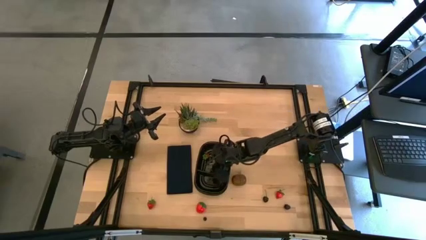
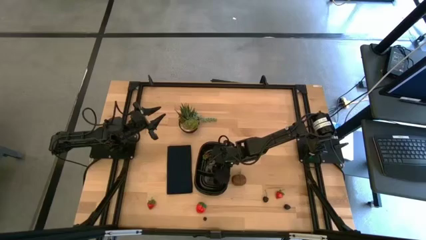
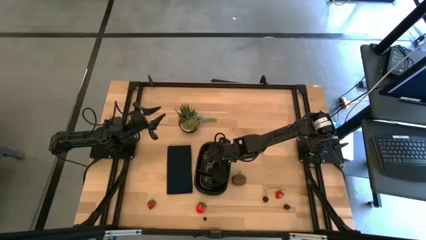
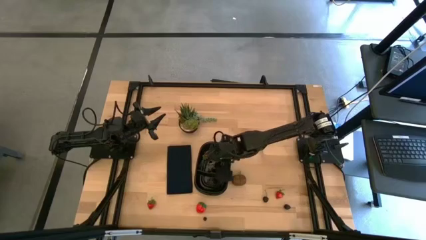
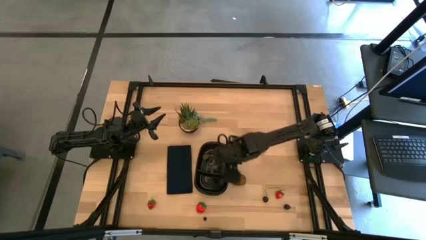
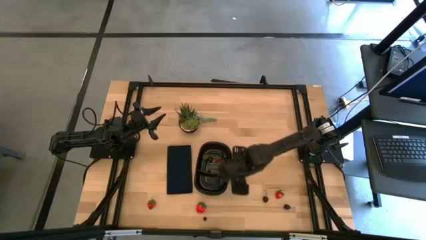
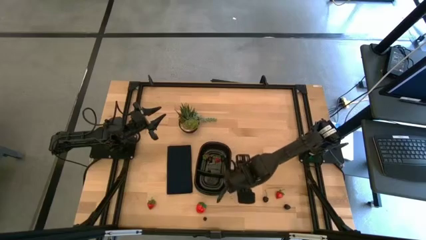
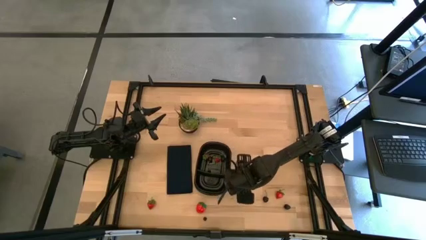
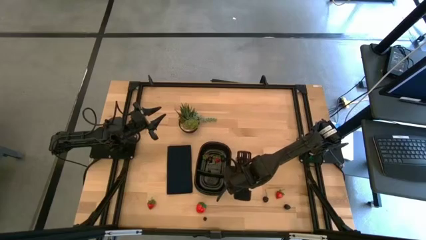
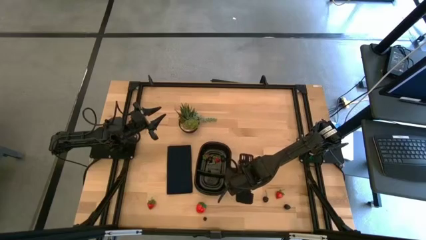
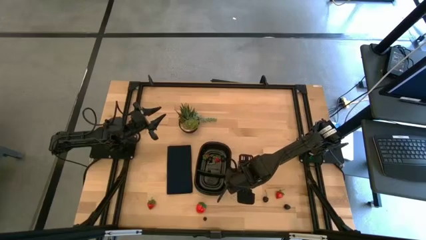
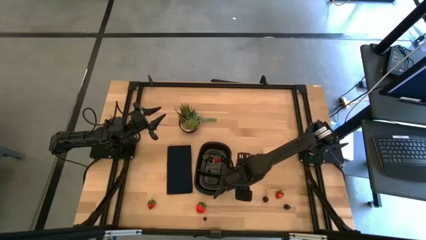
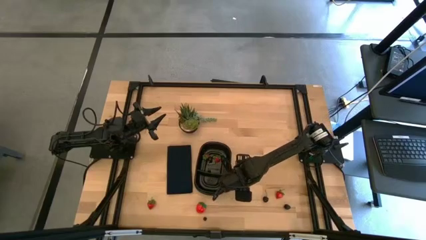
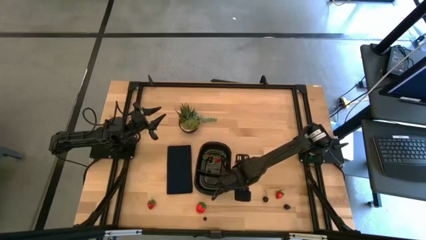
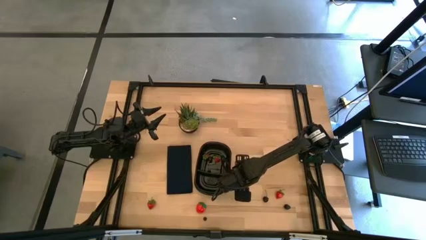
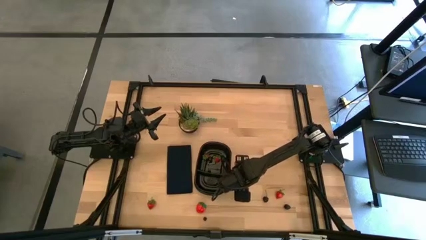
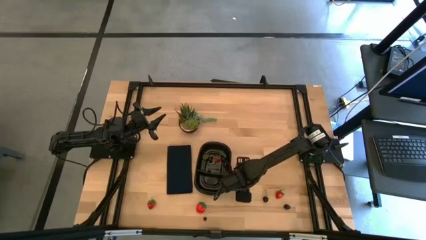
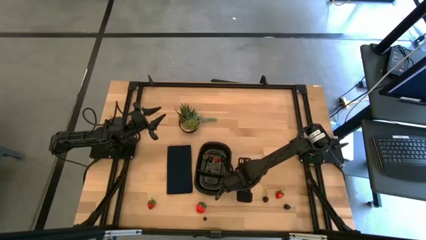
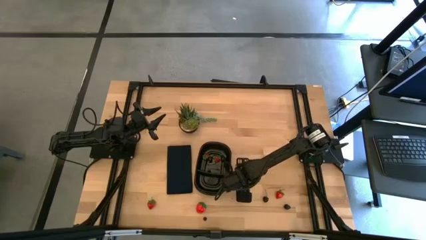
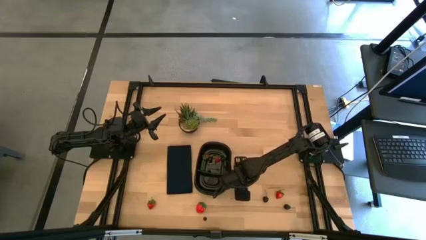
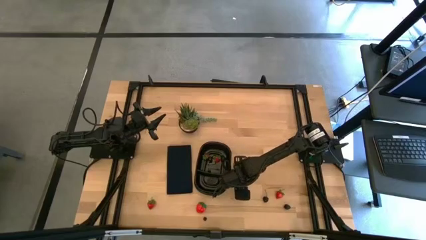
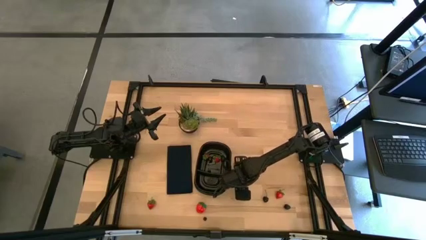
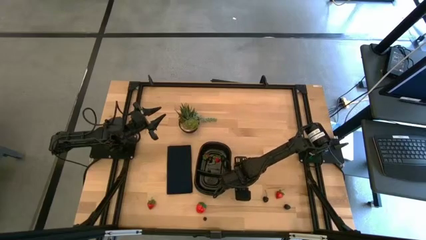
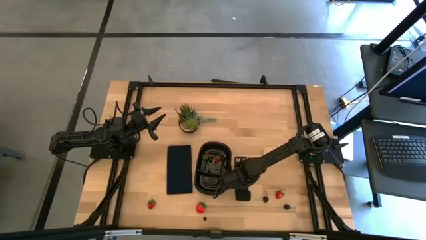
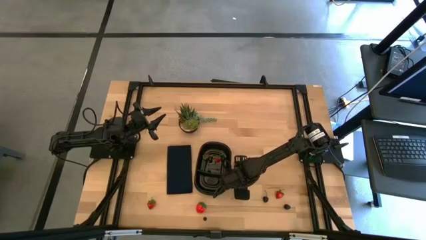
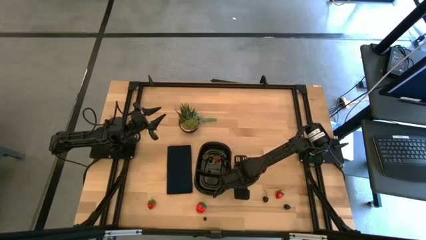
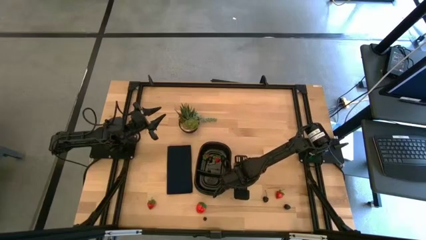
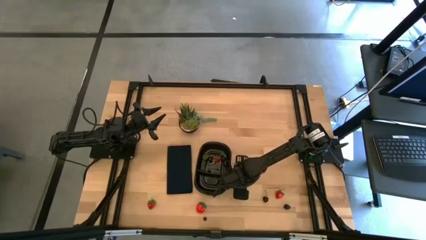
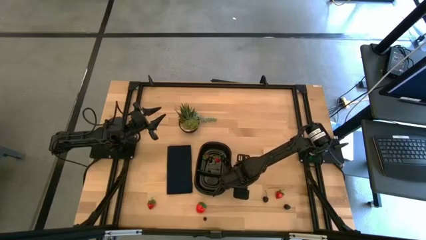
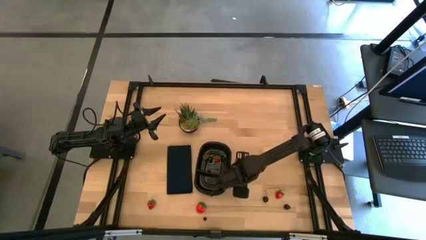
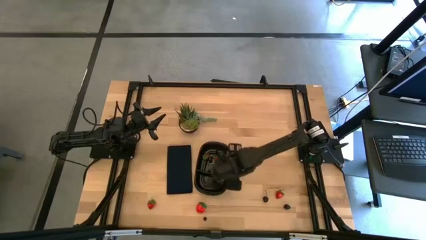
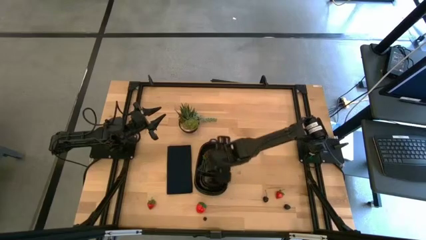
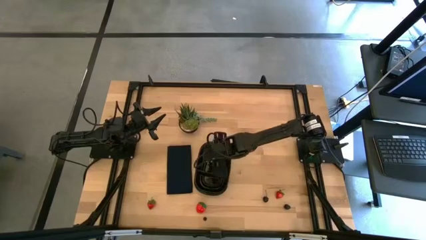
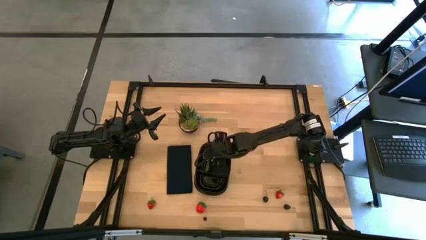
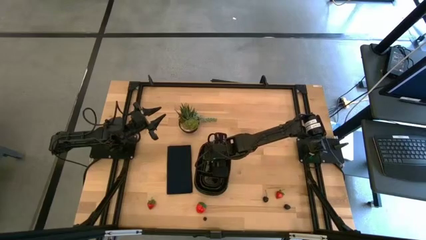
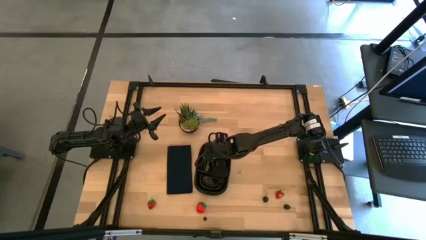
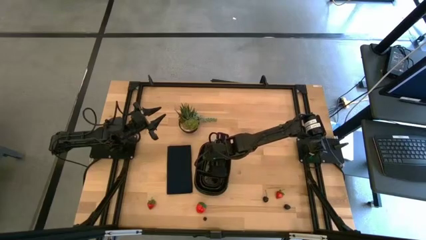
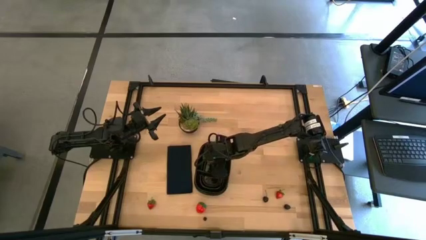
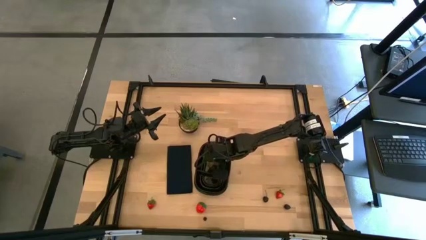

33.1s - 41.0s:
Task: Pick and placing Produce into tupperware
Put the brown kiwi into the black bin

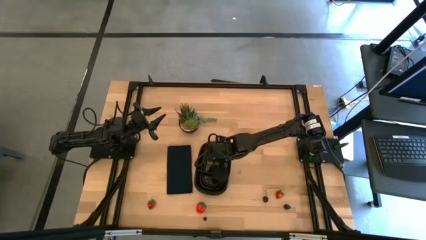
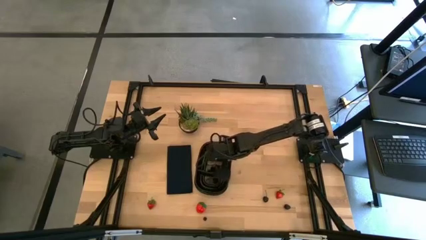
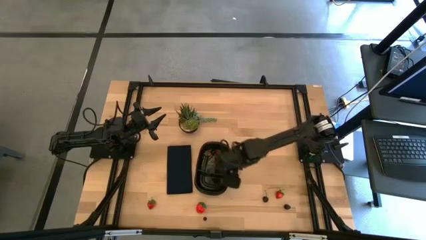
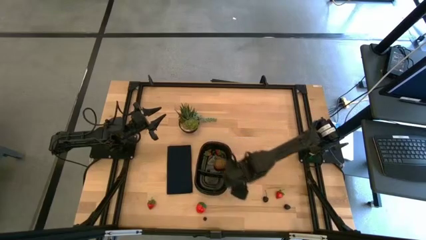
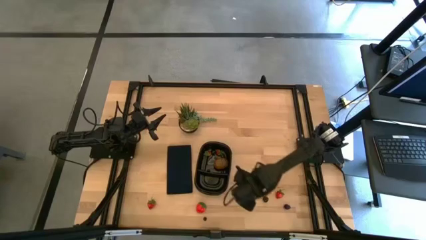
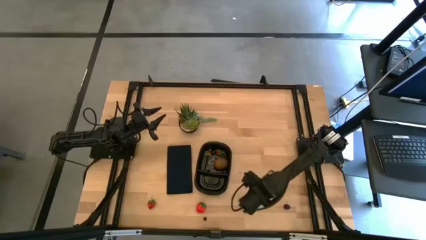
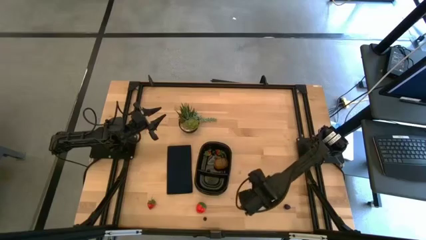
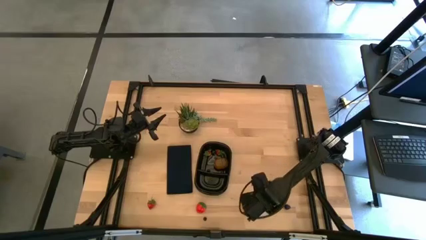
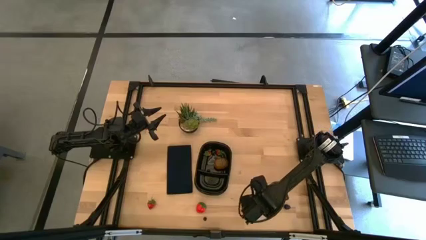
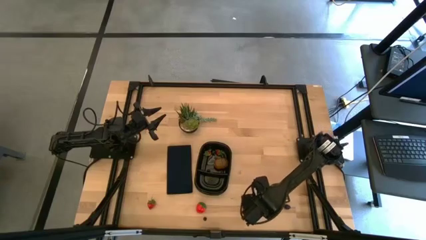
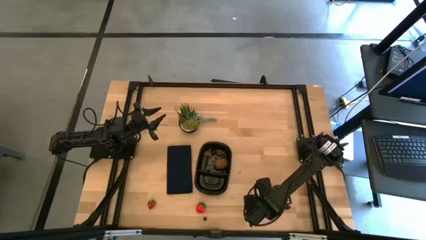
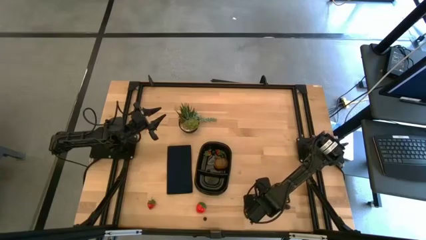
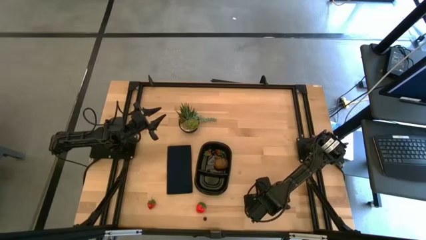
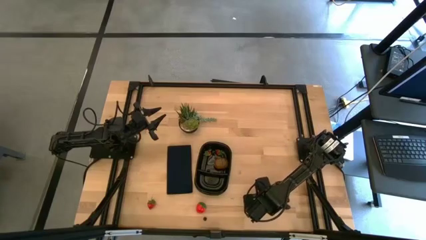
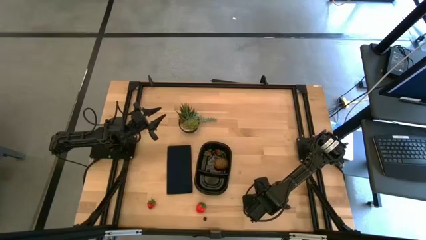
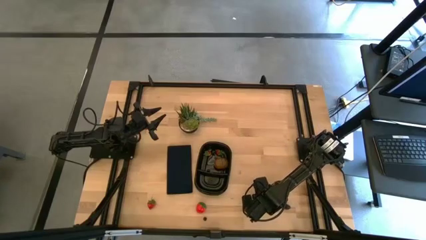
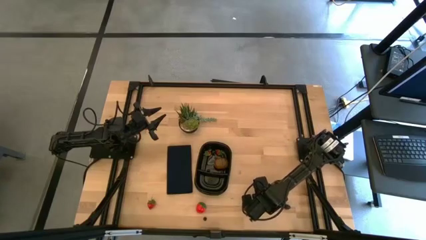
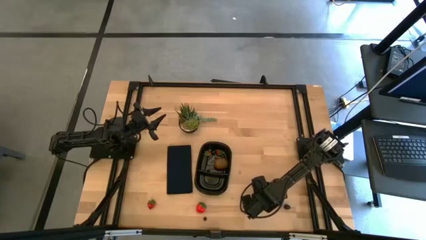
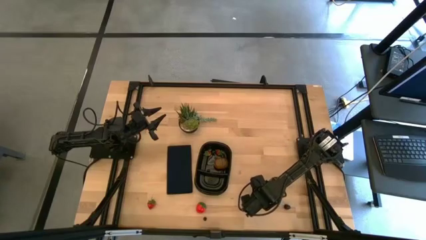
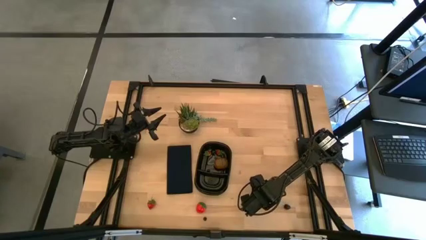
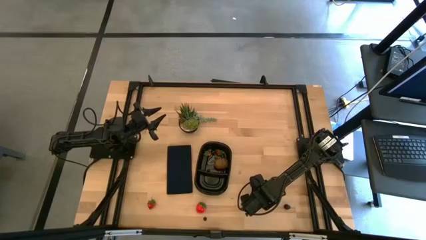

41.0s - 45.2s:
Put the black cherry into the black bin

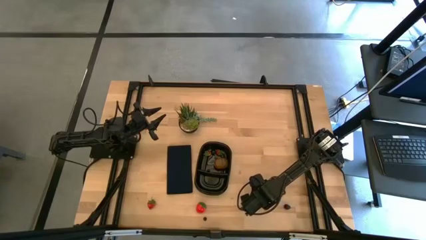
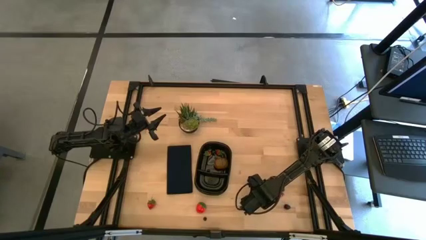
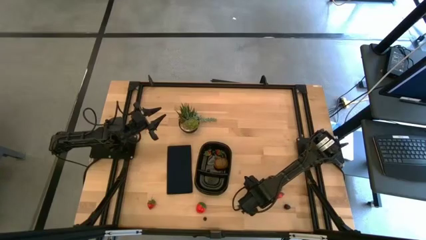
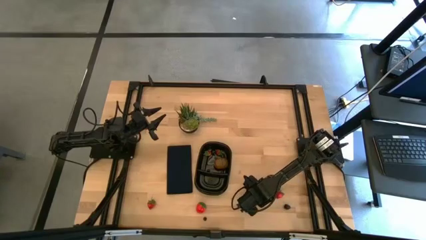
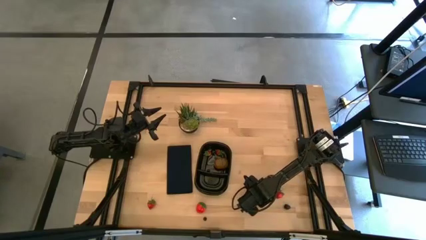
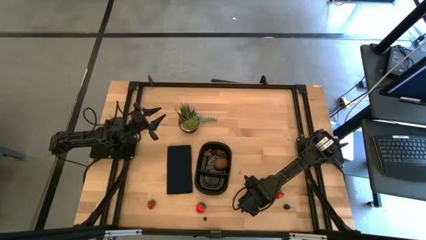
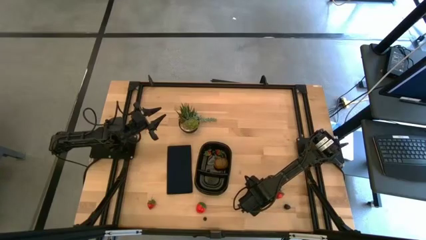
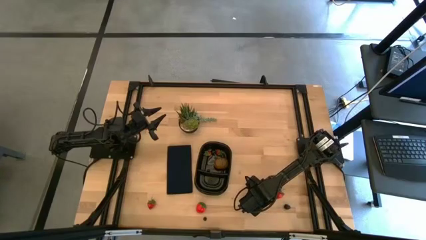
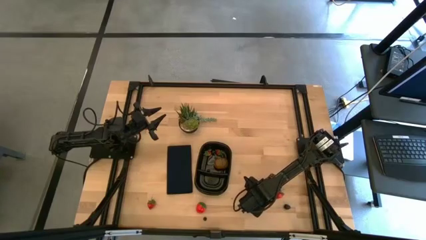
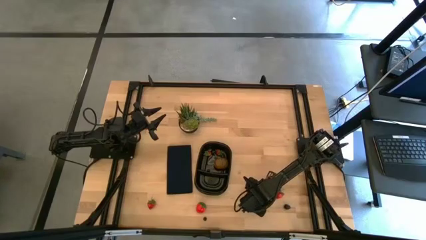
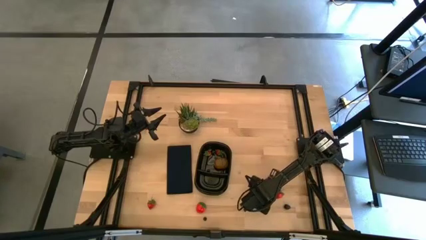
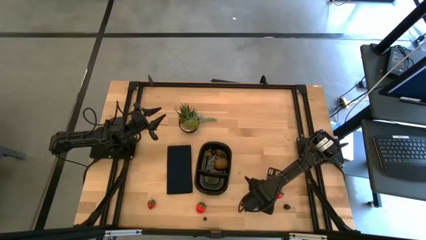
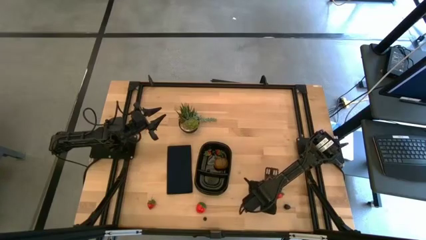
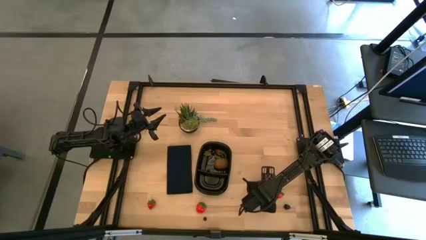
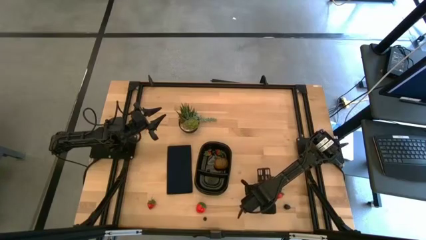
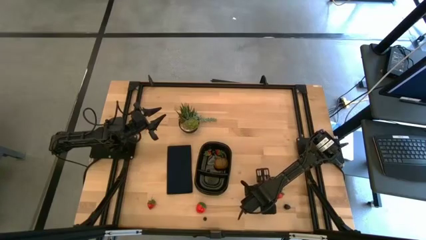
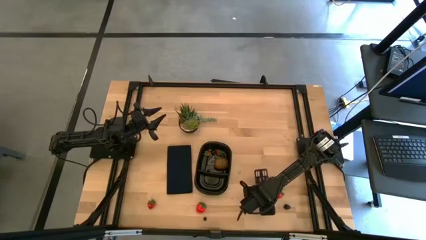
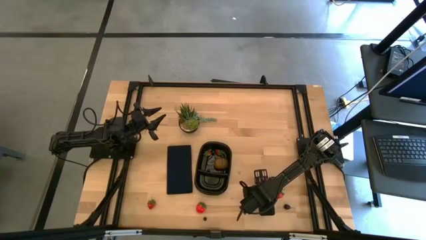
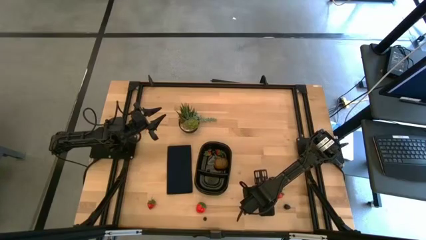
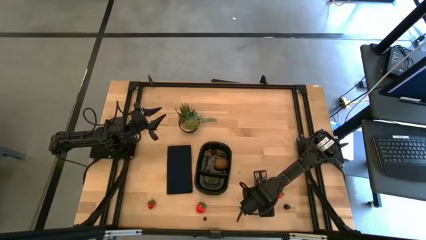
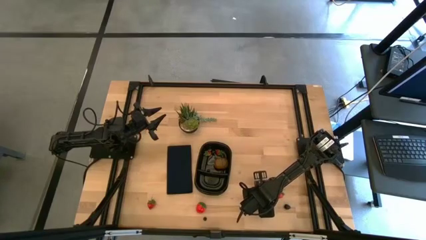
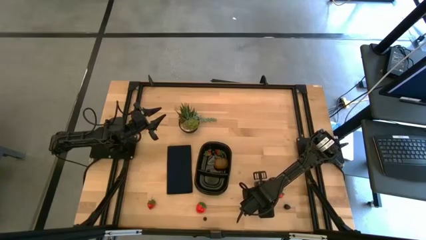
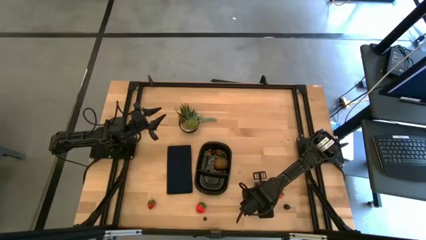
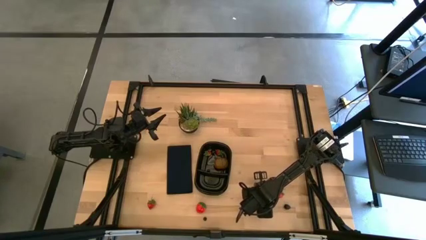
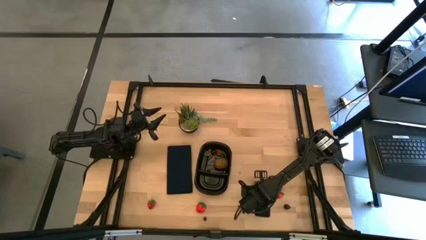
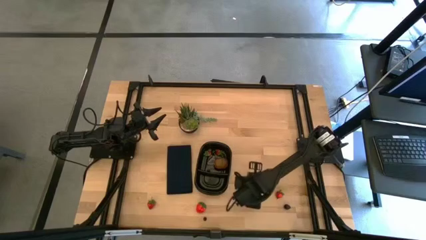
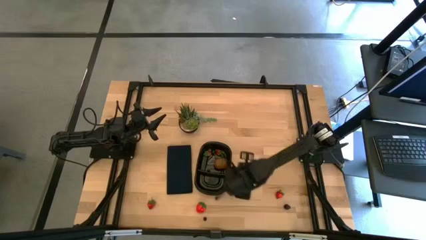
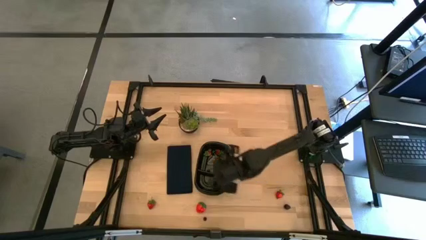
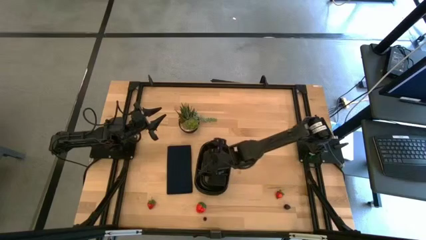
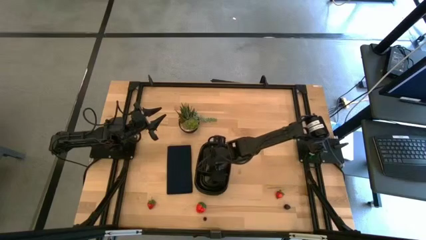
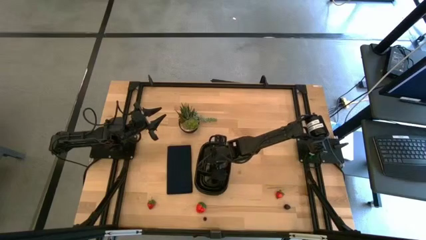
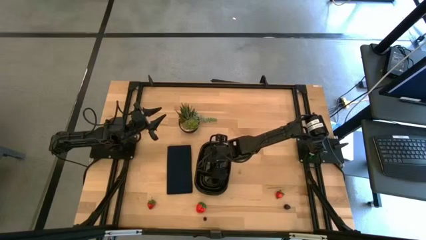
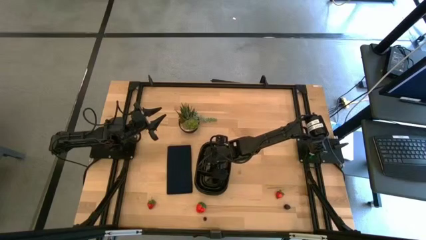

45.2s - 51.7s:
Put the black cherry into the black bin
